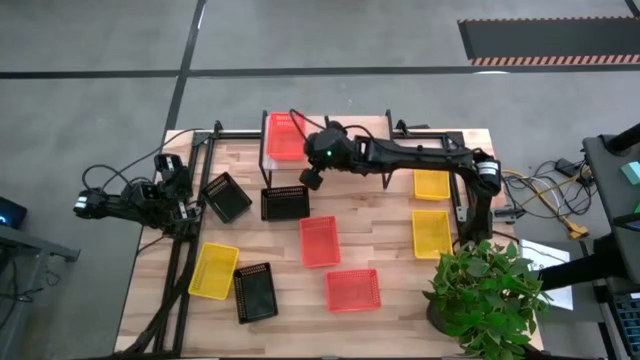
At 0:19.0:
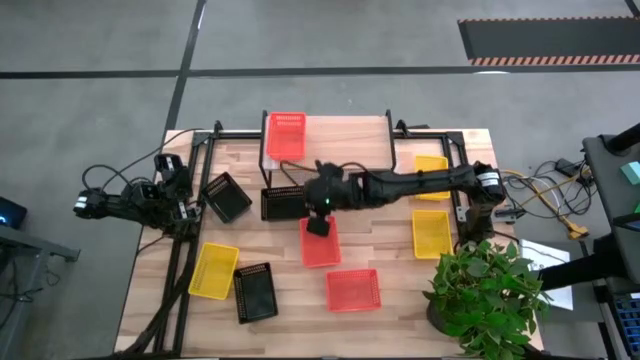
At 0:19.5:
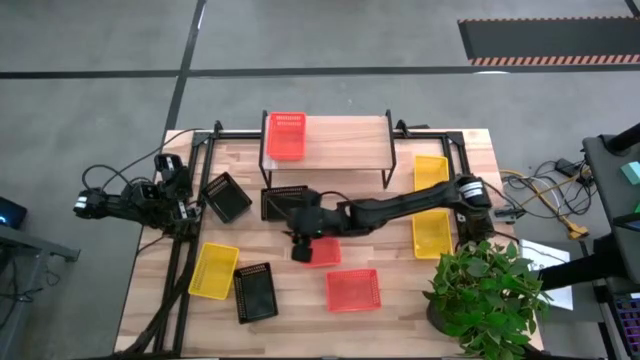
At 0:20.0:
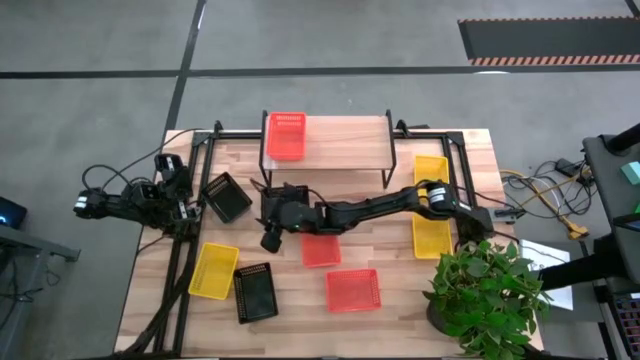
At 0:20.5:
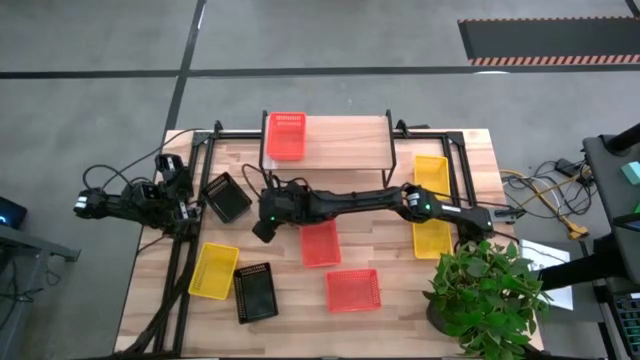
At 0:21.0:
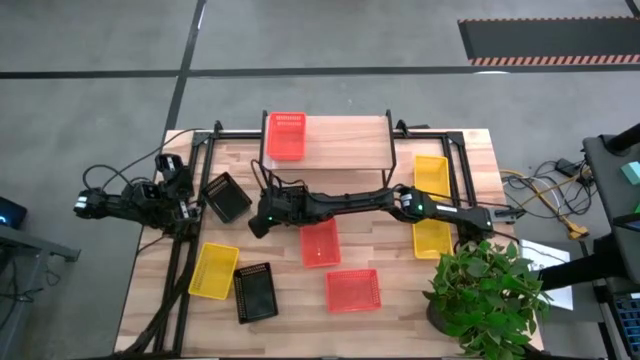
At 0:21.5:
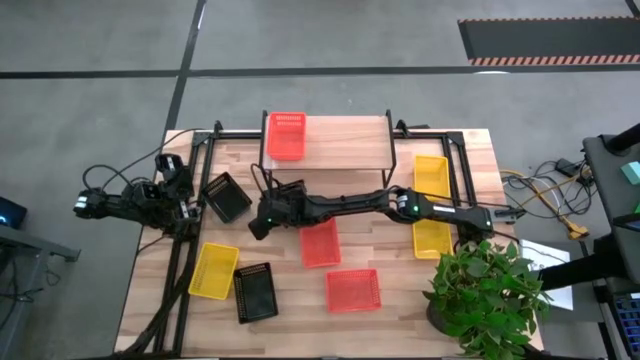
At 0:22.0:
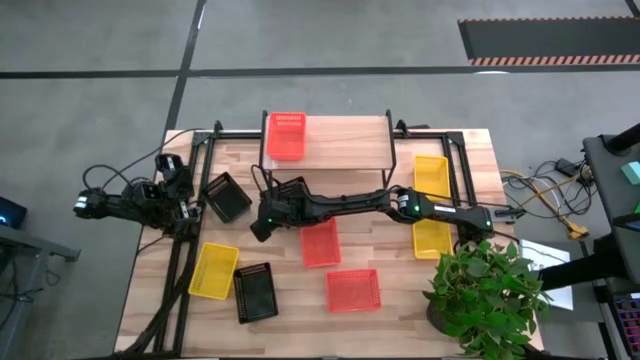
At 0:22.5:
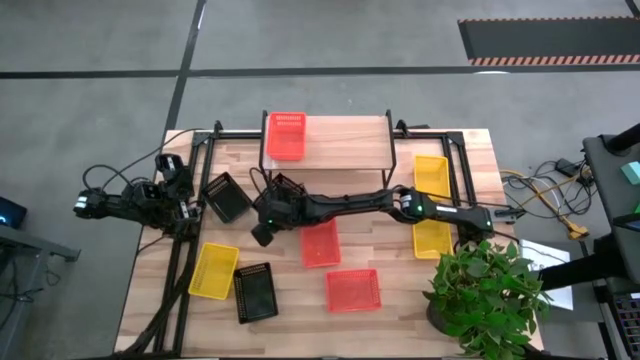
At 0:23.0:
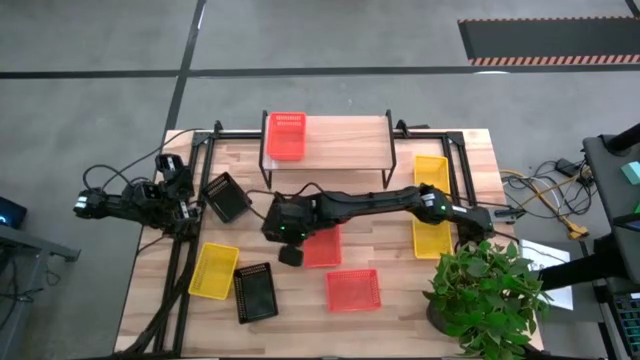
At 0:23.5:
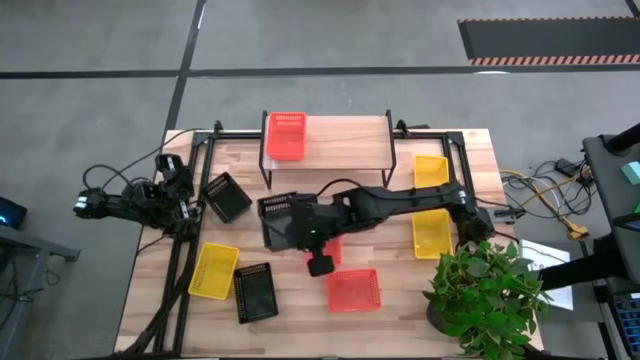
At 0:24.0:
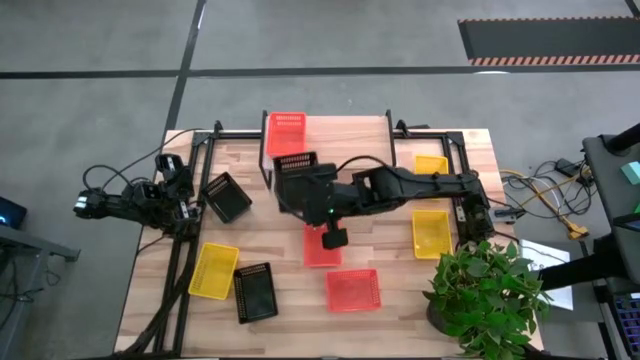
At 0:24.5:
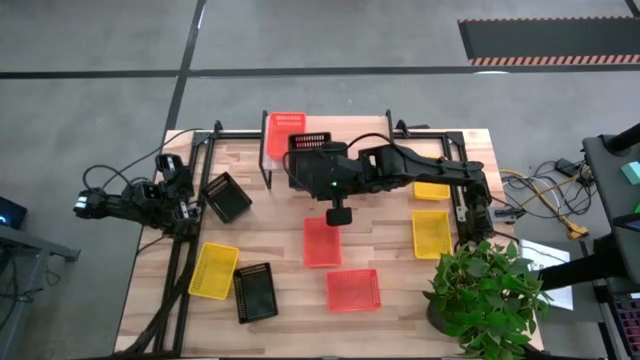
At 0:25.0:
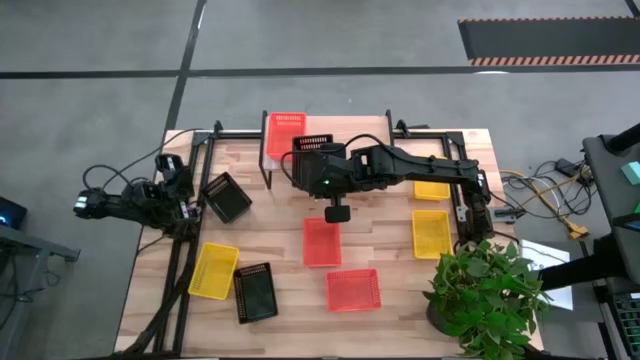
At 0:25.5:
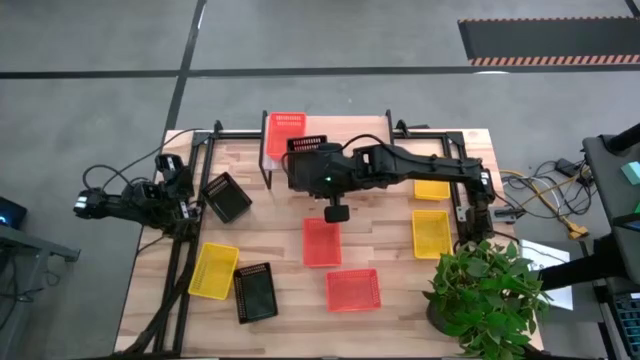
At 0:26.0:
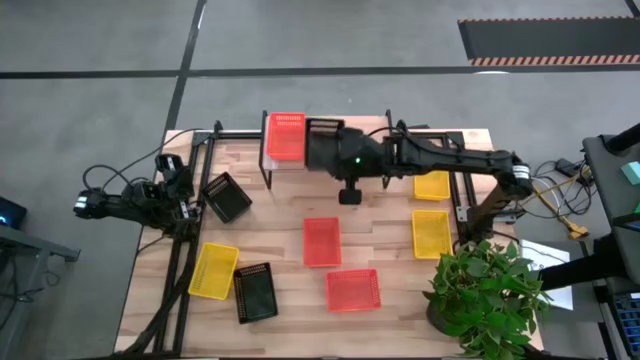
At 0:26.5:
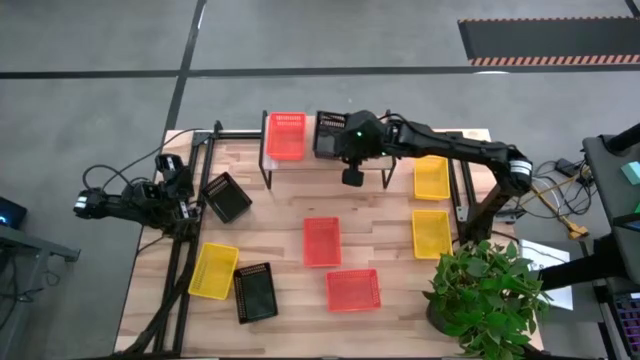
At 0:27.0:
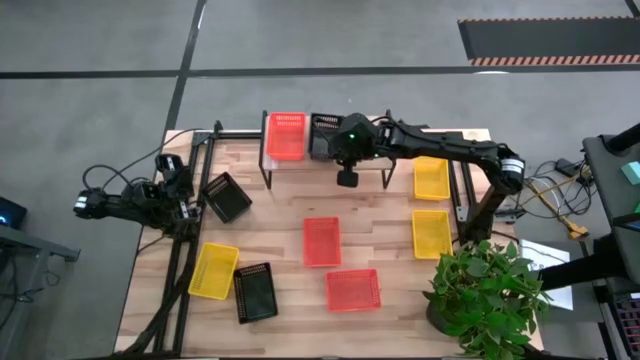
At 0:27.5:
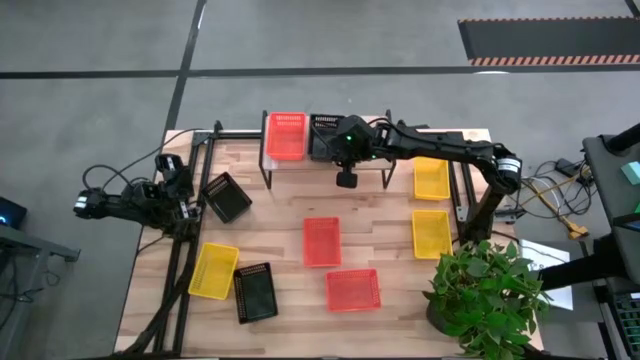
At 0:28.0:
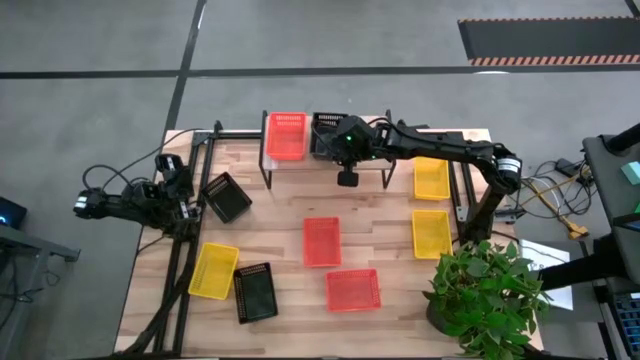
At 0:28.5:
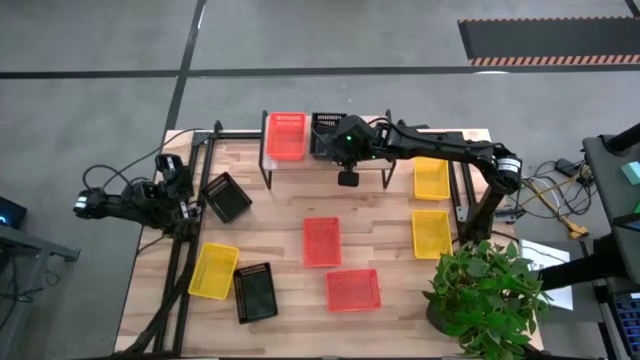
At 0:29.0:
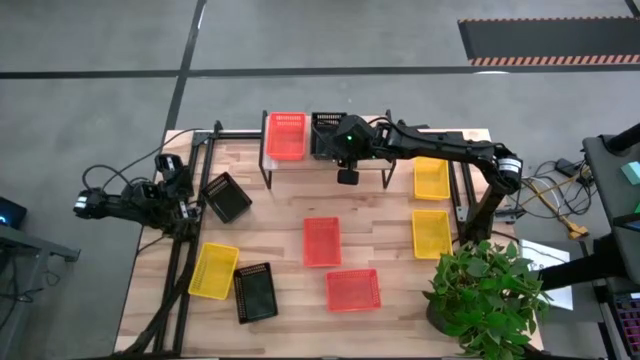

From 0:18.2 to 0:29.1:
Put the top right black basket on the shelf

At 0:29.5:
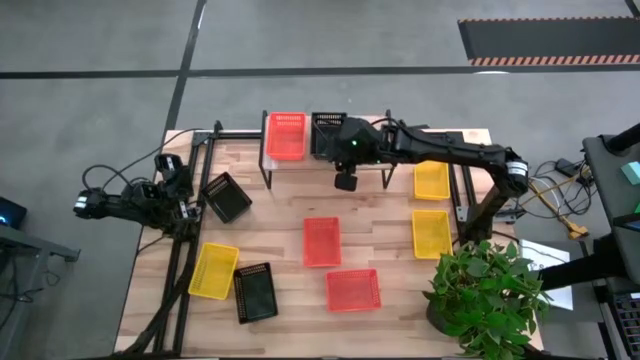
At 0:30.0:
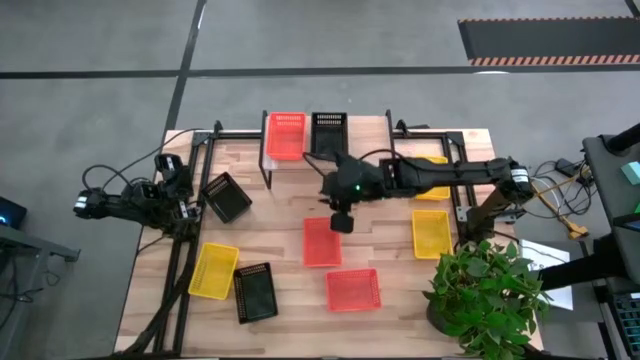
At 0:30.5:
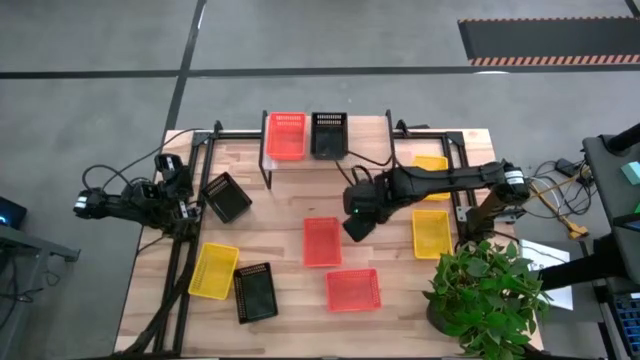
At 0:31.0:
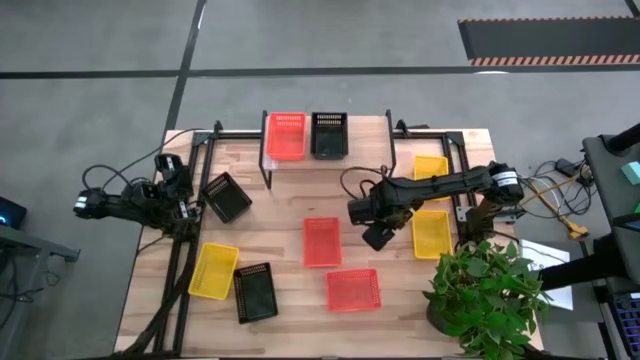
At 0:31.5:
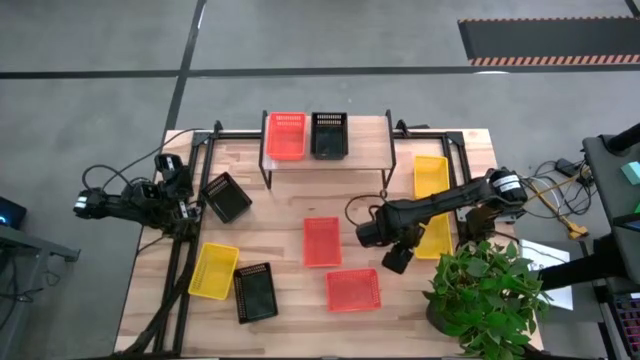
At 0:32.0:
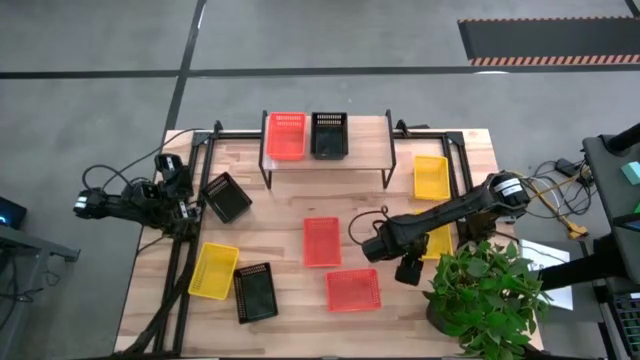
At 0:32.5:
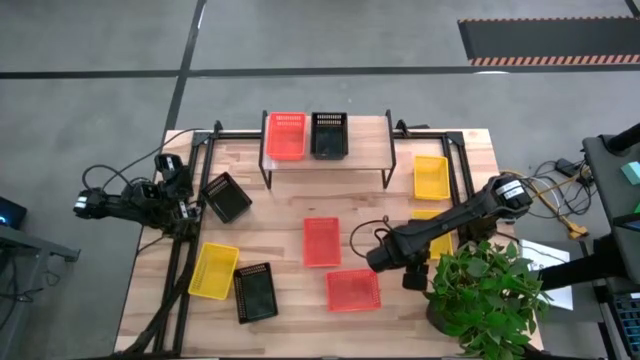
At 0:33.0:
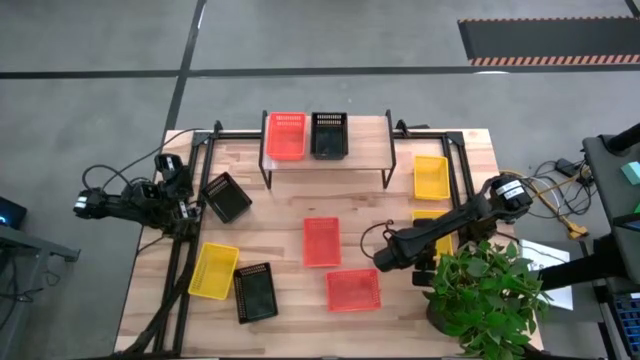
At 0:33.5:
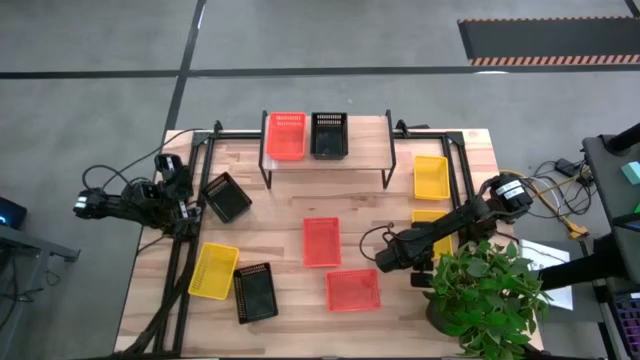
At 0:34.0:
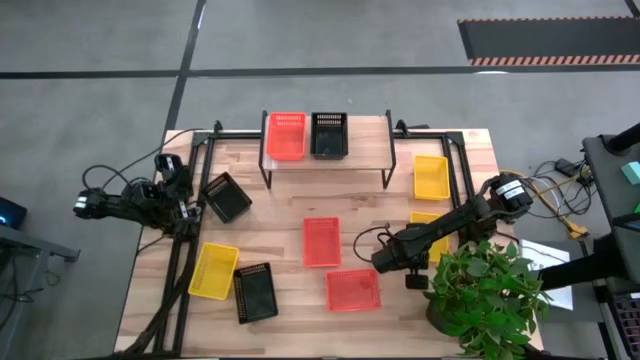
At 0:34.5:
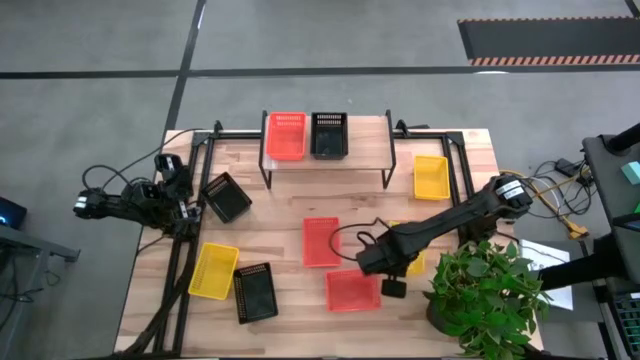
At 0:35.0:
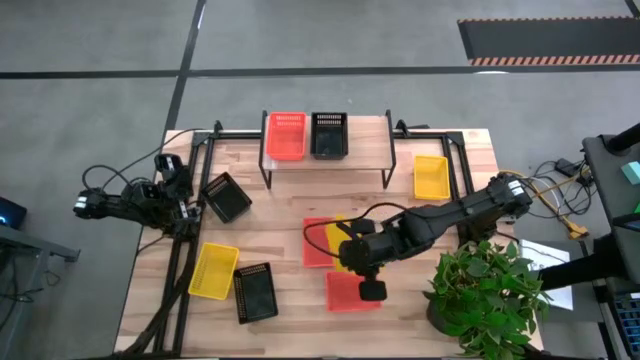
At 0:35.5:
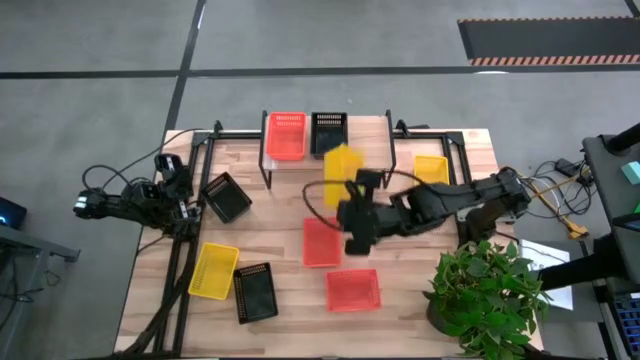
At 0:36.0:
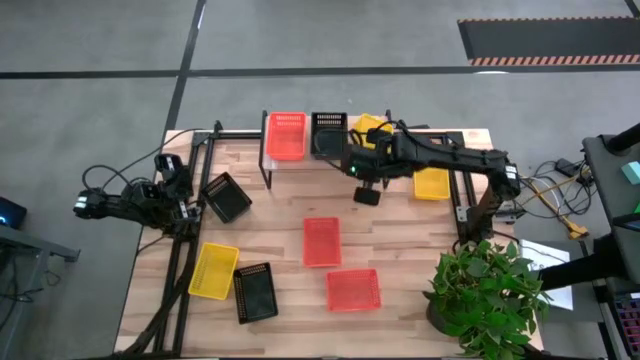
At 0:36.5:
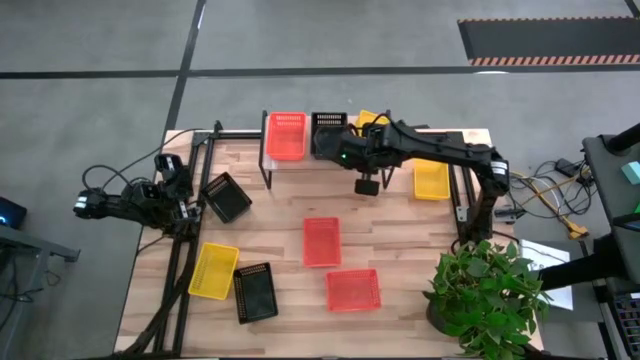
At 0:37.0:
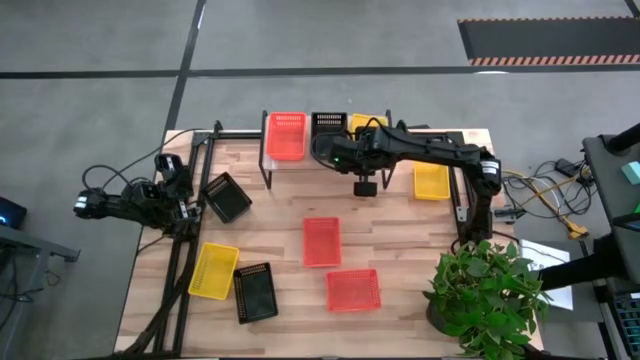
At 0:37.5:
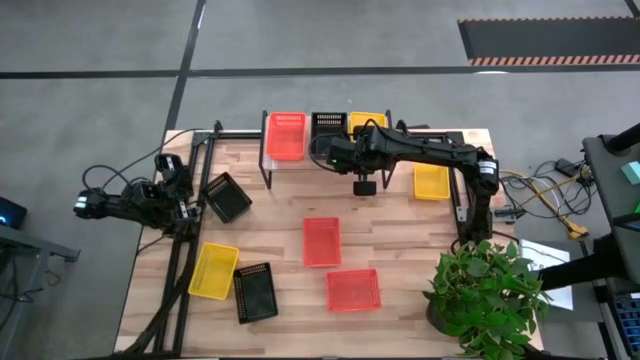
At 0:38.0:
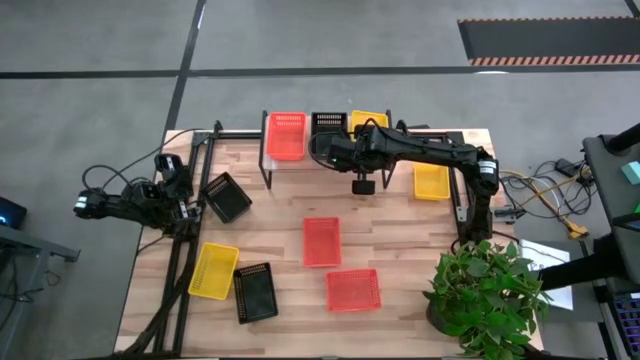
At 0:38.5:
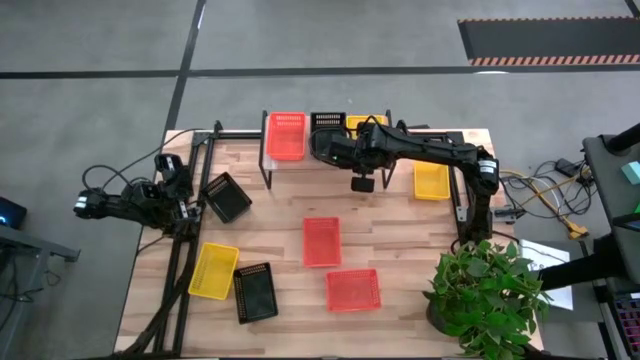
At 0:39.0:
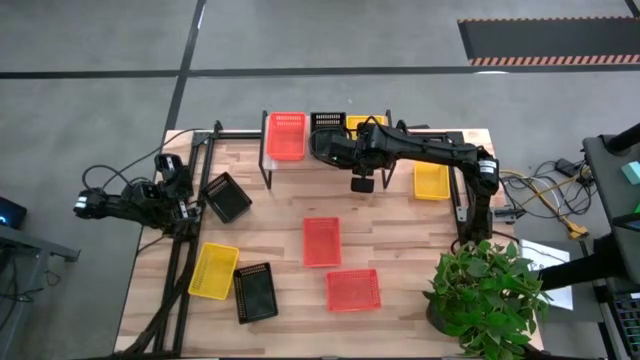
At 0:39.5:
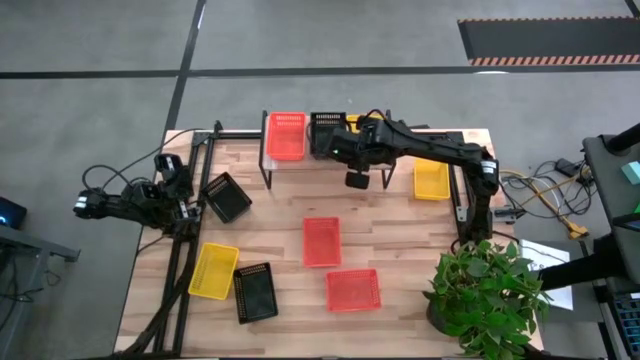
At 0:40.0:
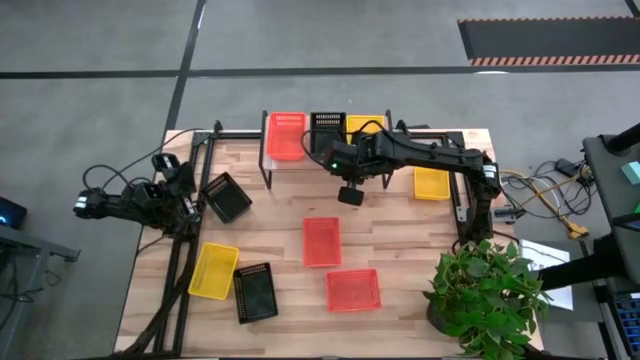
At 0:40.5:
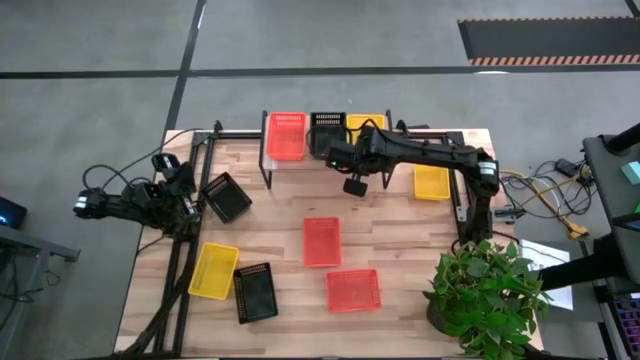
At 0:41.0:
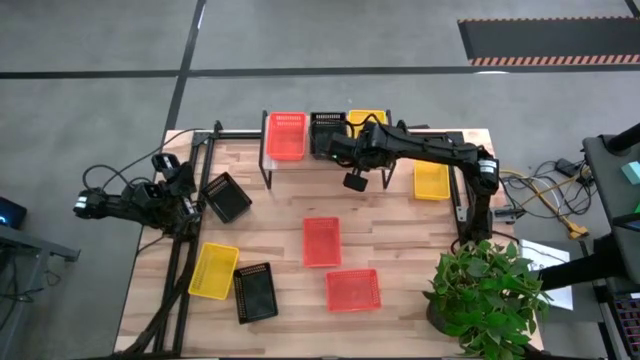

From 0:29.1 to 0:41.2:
Put the middle yellow basket on the shelf
